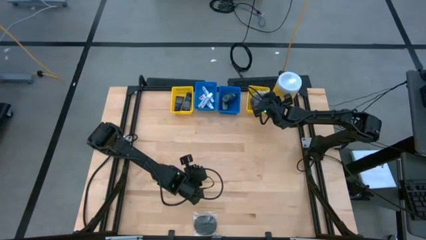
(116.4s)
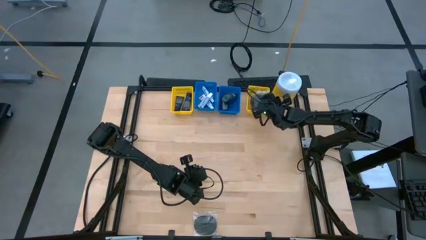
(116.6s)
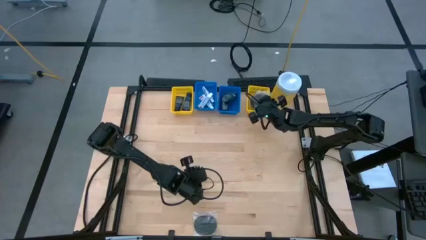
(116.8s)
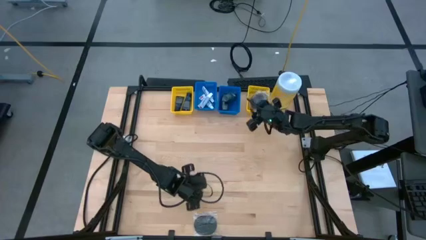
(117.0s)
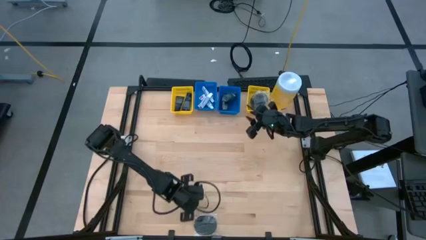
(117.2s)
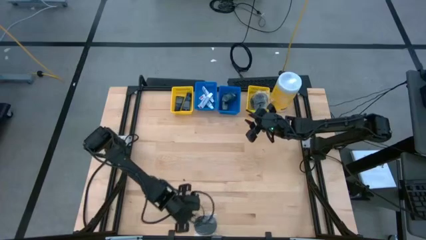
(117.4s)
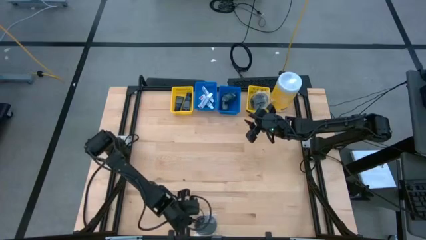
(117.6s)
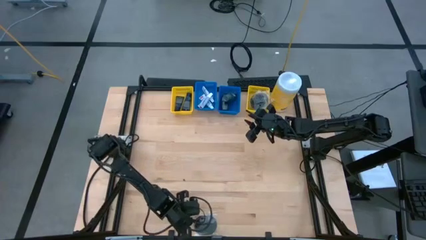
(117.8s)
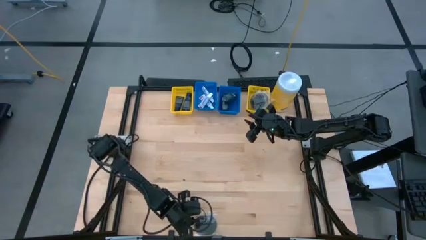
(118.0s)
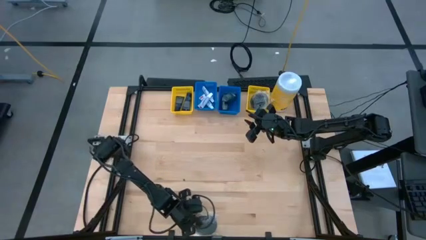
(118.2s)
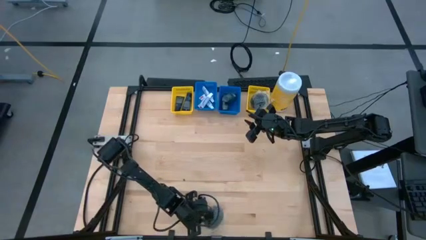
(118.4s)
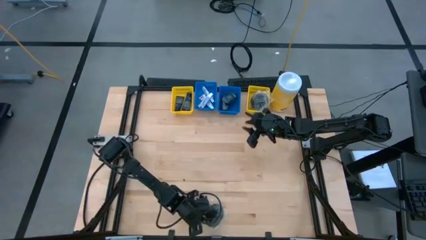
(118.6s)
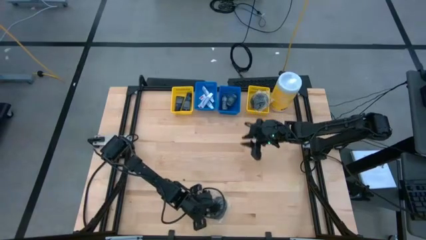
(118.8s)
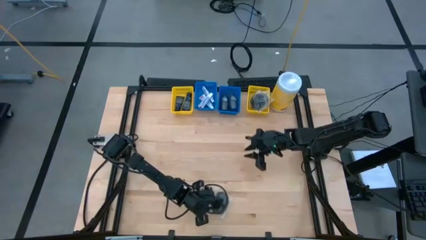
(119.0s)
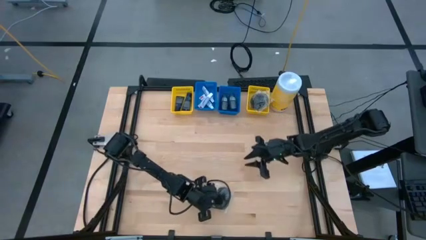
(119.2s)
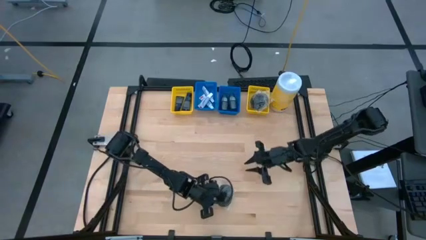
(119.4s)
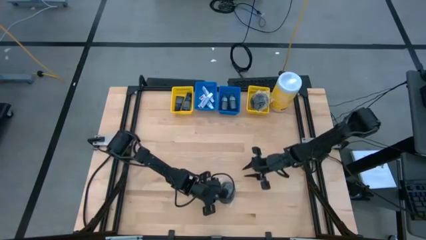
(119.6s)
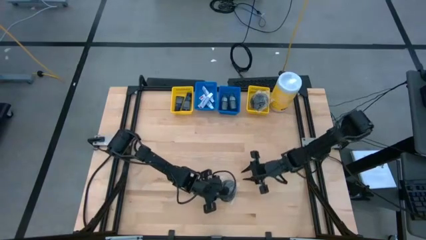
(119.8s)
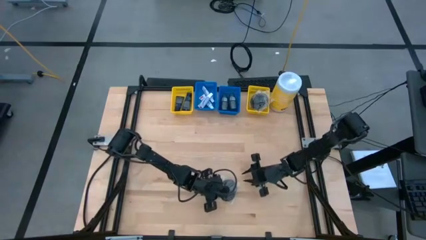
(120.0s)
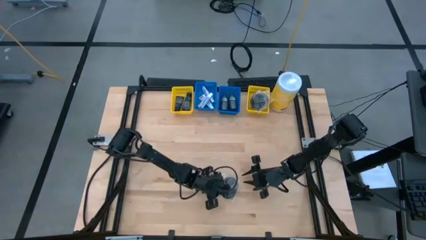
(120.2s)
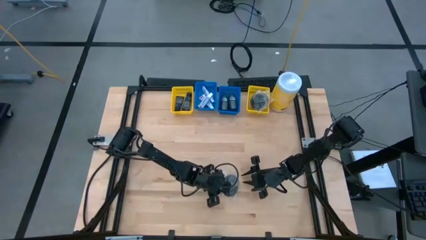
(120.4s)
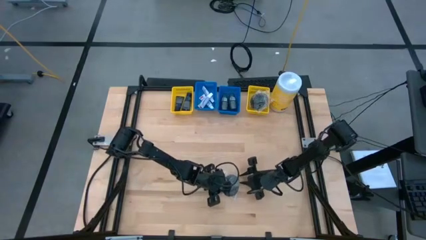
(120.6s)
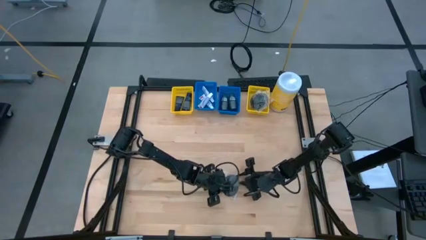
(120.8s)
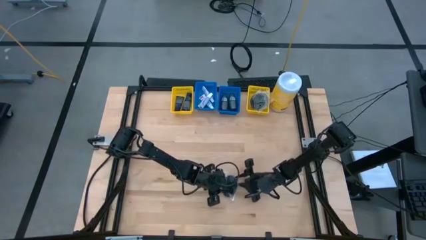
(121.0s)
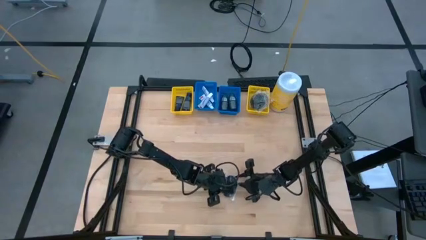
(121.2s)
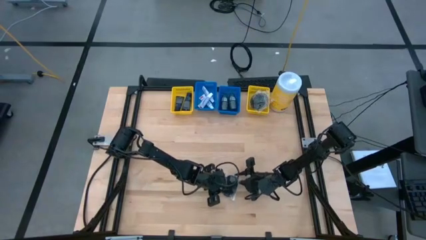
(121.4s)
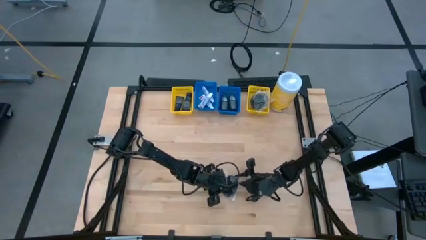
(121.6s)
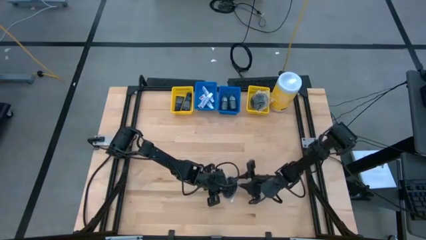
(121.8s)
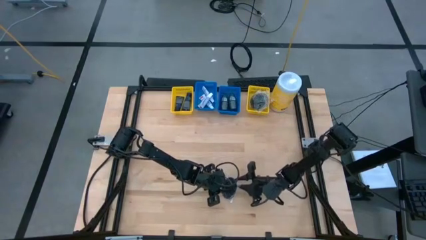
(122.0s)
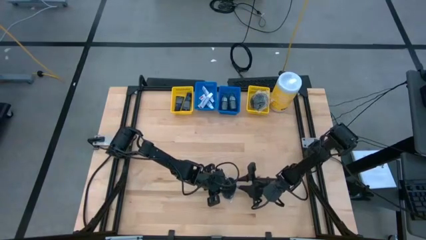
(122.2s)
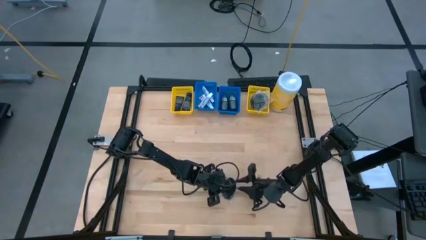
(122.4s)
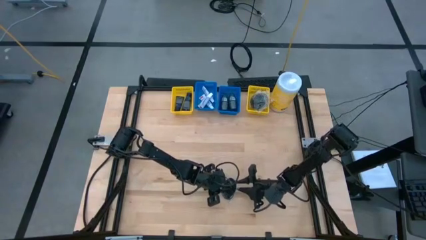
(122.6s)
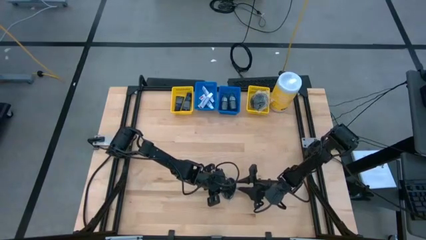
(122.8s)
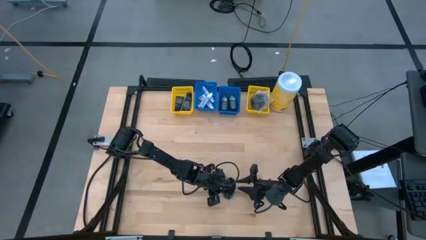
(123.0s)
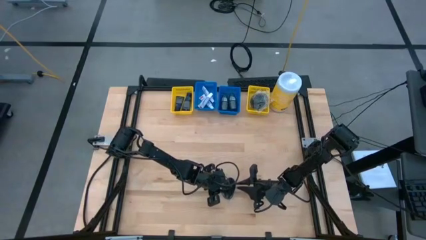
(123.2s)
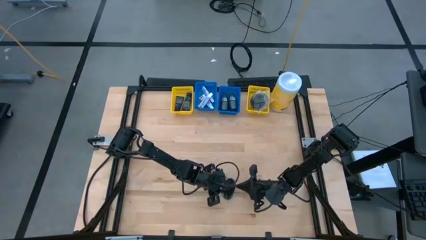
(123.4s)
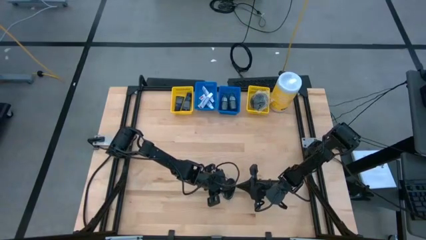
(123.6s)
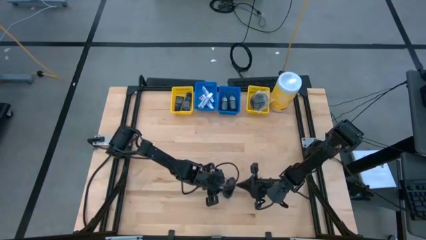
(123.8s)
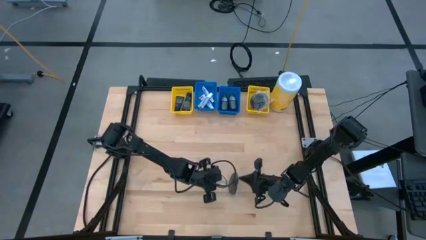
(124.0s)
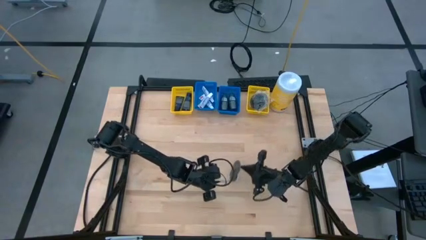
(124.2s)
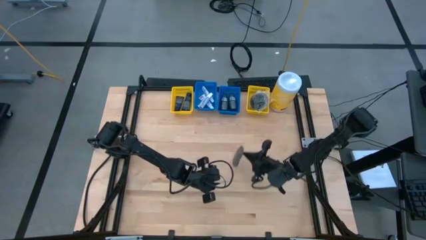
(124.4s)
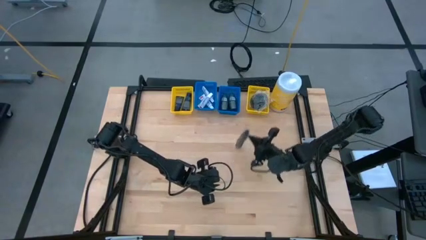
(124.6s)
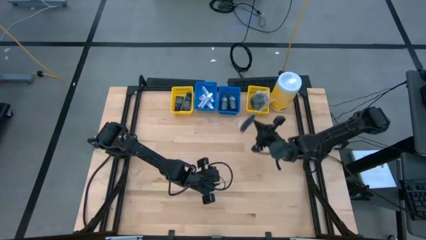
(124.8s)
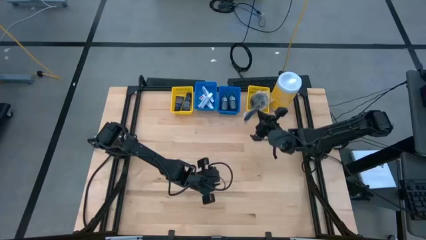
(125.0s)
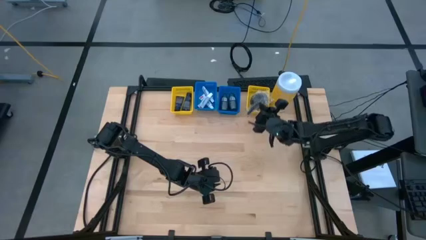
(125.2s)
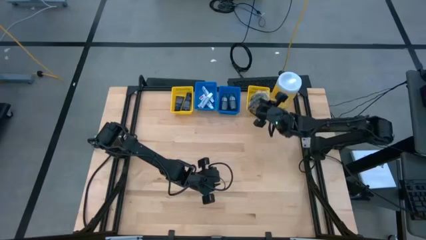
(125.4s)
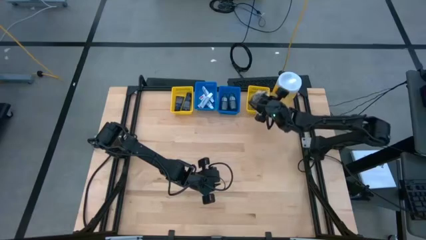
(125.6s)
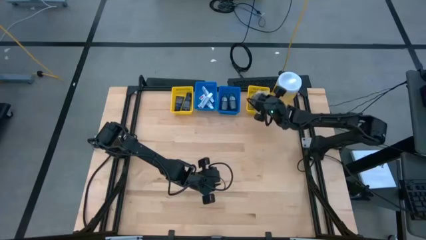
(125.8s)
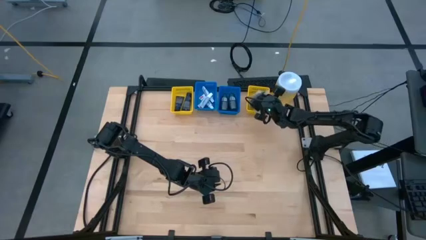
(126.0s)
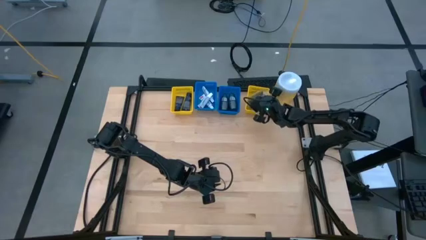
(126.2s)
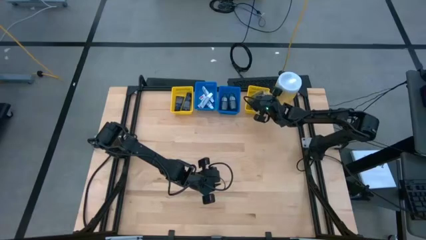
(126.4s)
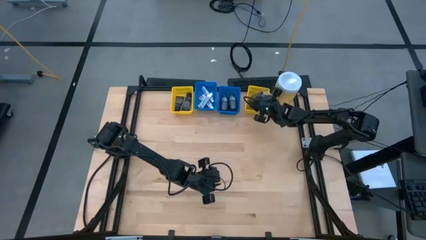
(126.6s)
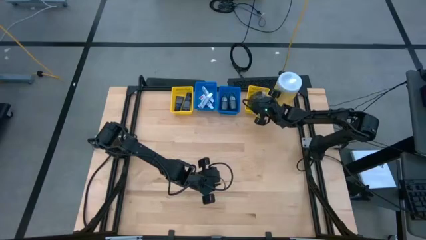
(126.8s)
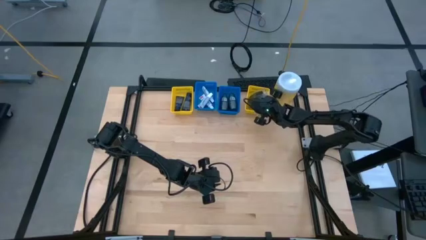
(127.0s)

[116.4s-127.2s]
Task: Pick & Place Travel size toiletries
Put the black hairbrush into the right yellow bin

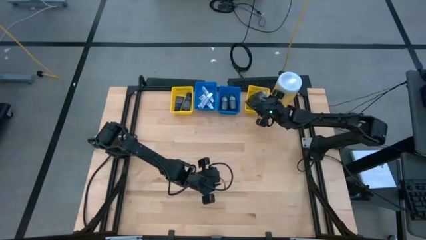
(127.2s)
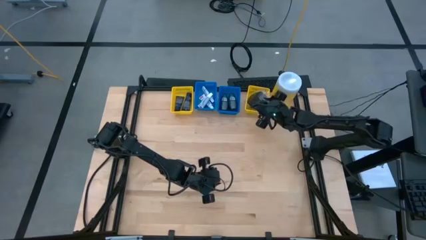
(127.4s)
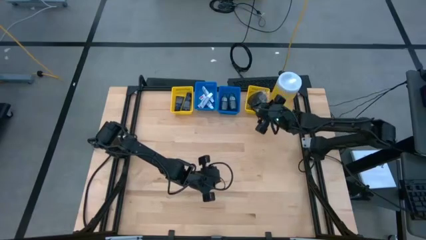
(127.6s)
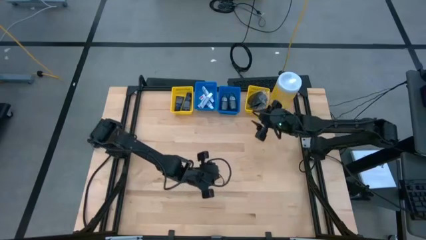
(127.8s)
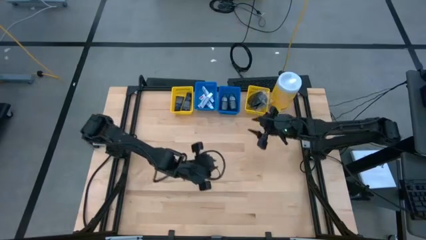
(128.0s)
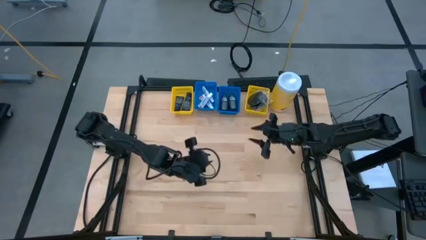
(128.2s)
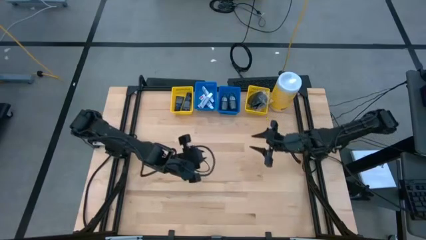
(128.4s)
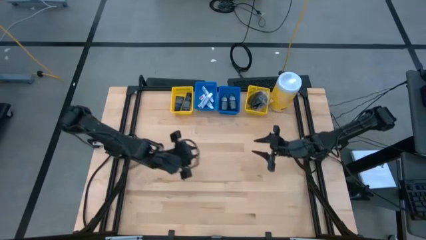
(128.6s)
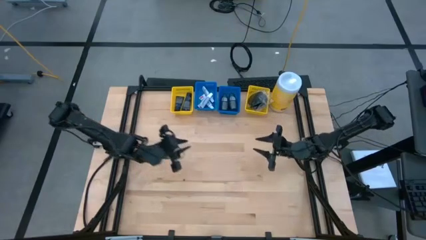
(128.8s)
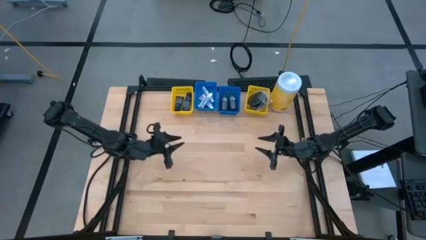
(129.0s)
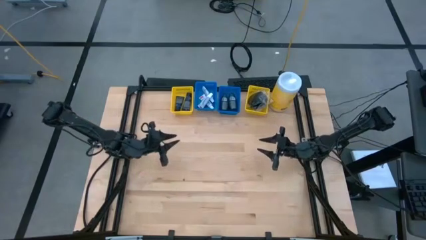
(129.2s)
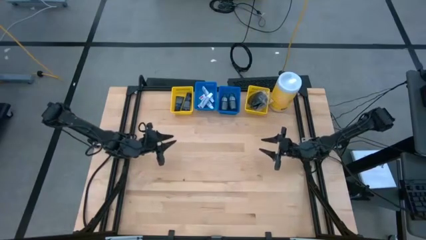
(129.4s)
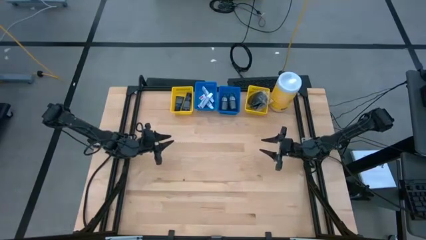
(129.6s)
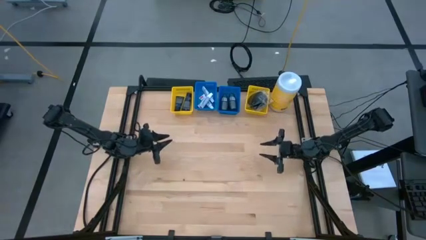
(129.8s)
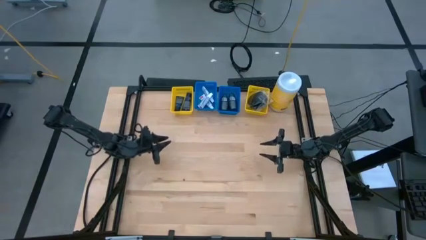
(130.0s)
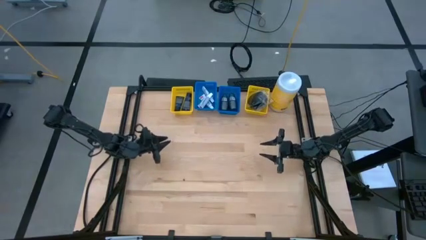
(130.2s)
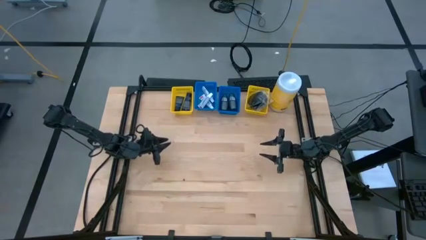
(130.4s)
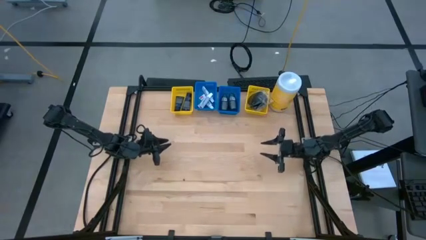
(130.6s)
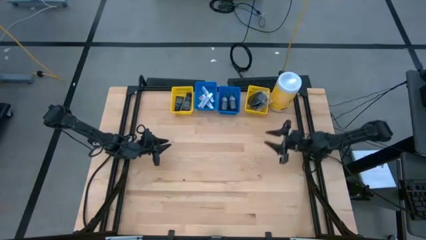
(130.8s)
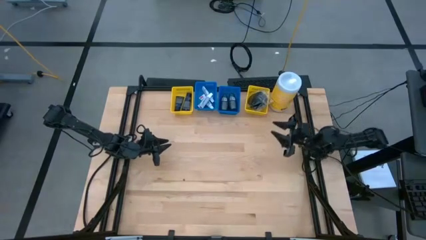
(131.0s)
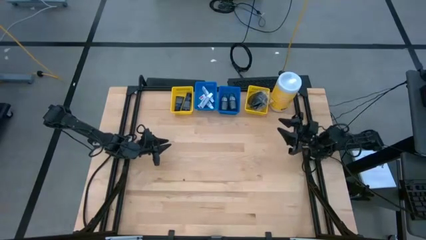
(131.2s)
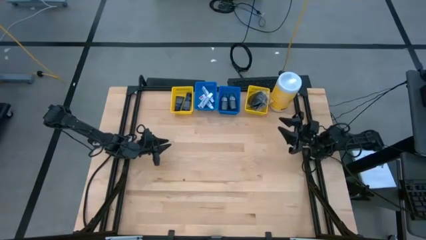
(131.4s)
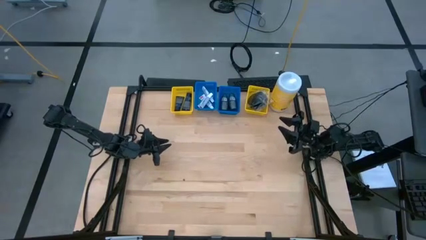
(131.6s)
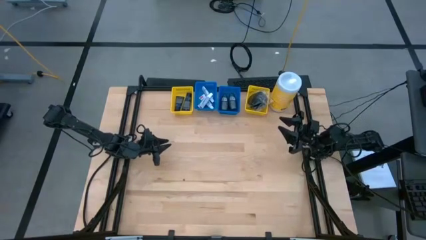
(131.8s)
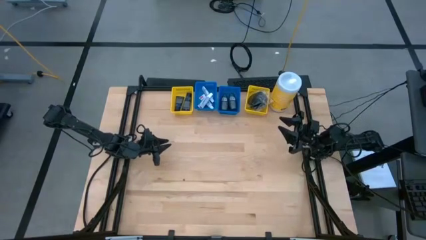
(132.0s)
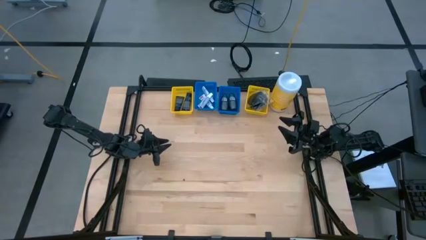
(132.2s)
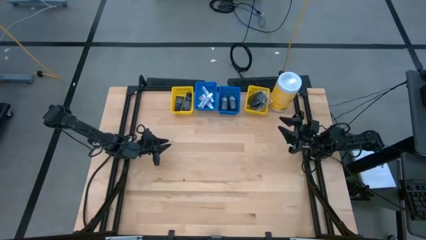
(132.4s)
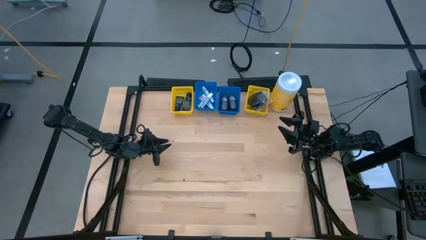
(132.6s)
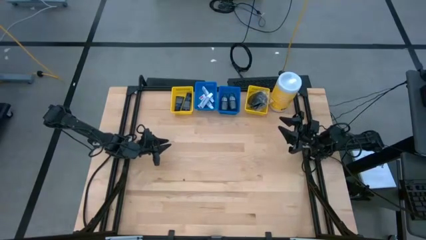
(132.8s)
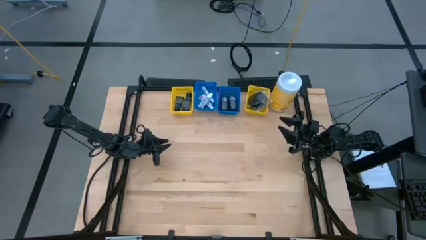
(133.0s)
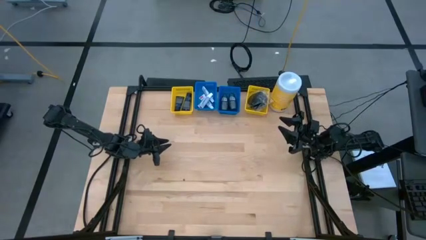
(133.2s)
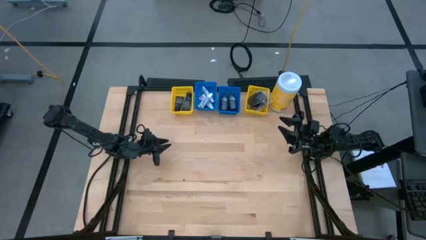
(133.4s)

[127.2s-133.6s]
Return to Home Position
